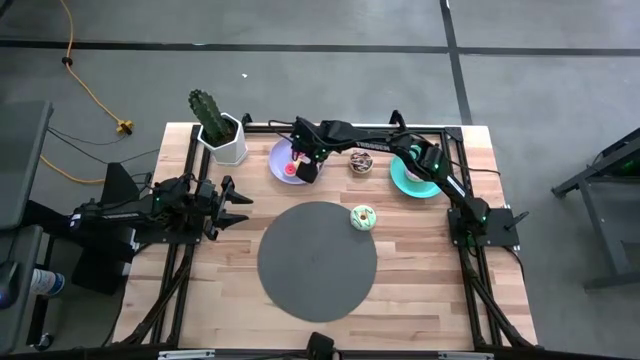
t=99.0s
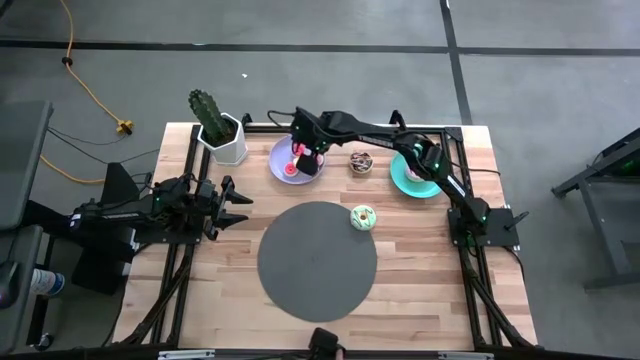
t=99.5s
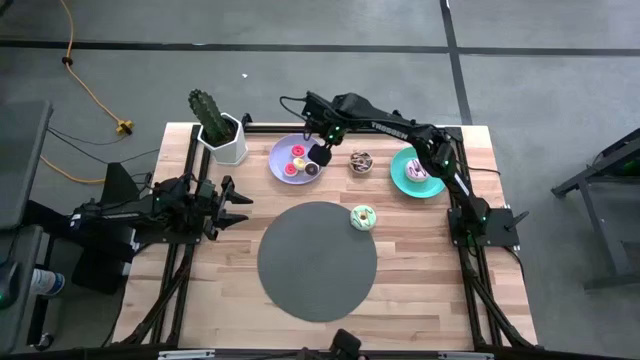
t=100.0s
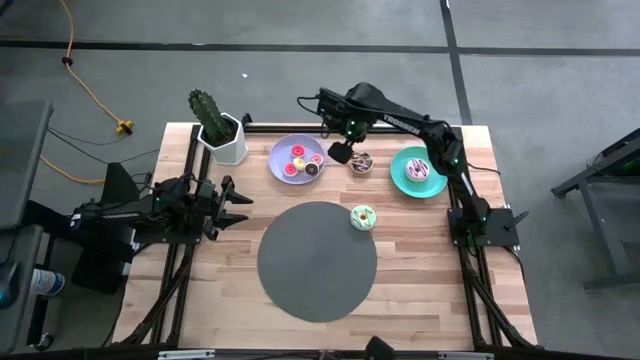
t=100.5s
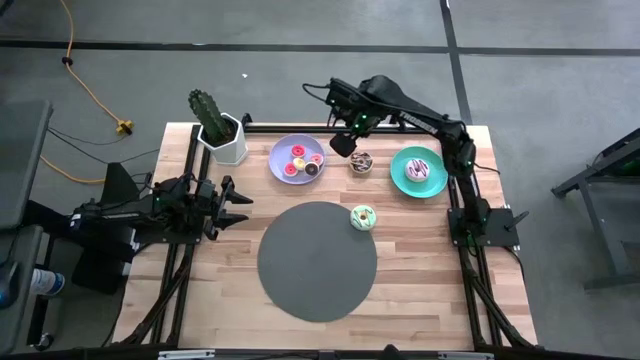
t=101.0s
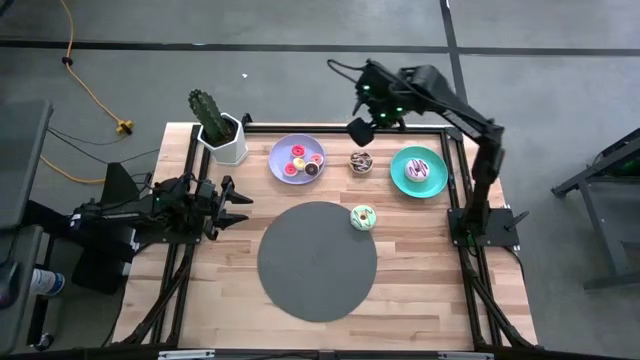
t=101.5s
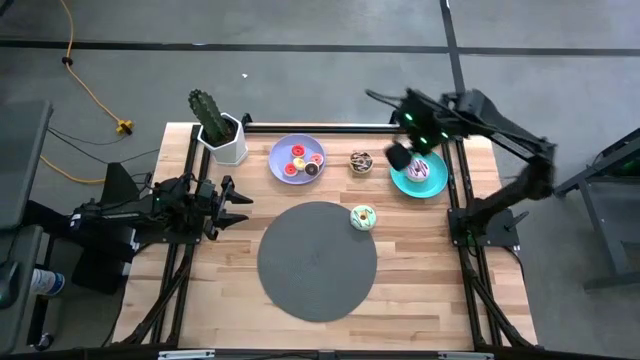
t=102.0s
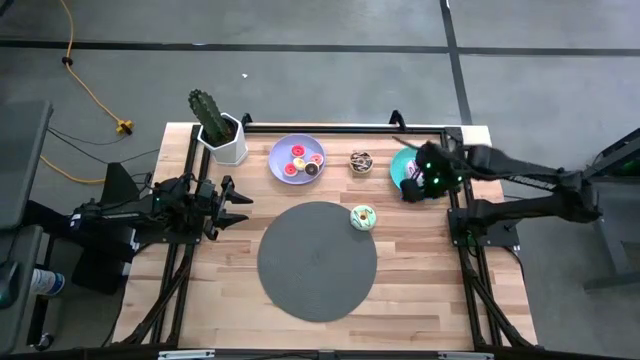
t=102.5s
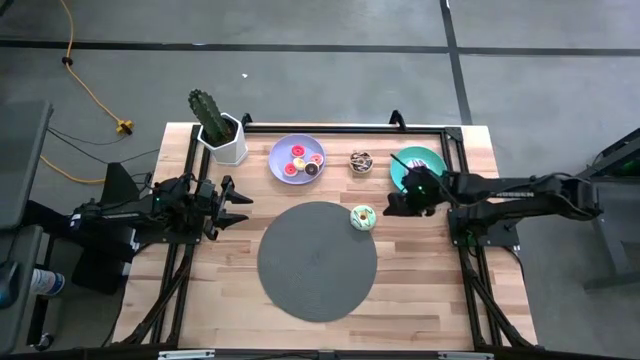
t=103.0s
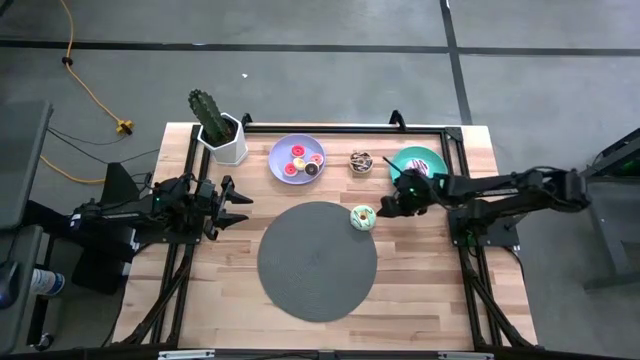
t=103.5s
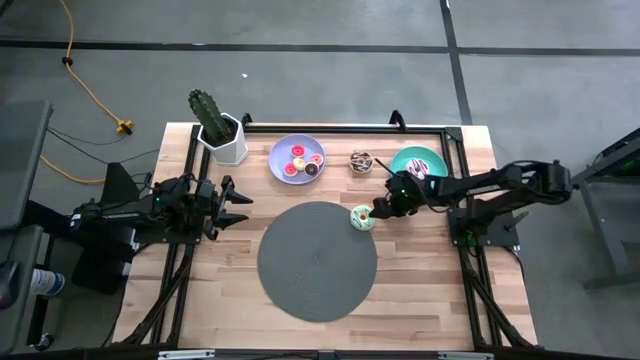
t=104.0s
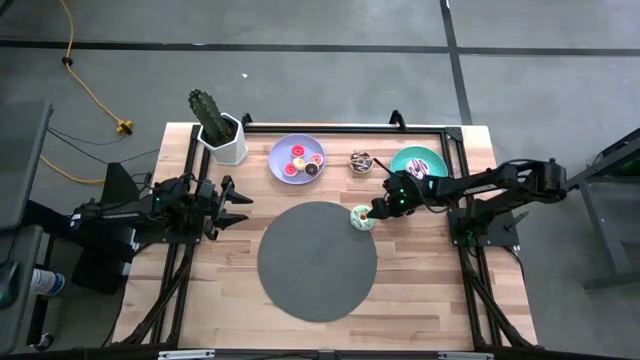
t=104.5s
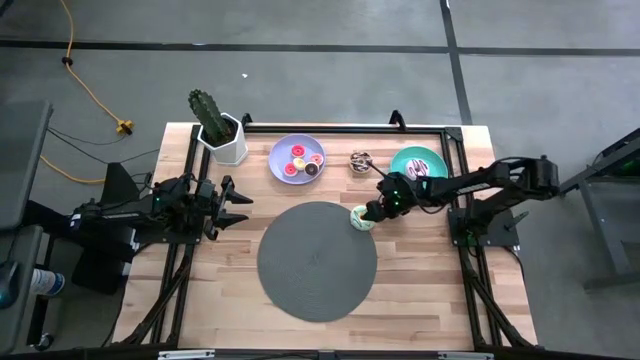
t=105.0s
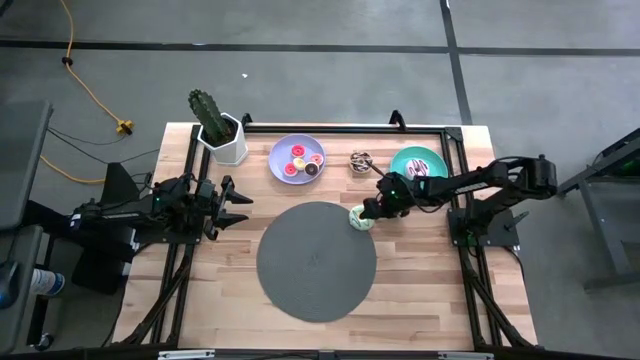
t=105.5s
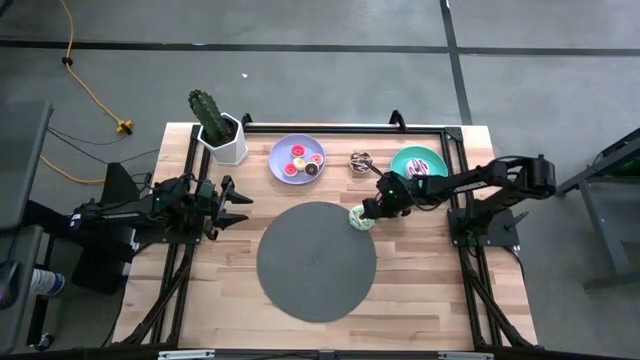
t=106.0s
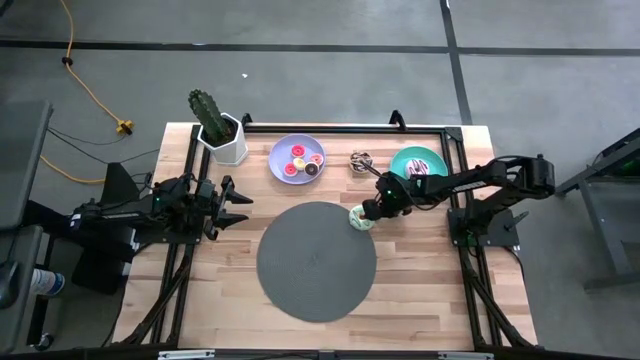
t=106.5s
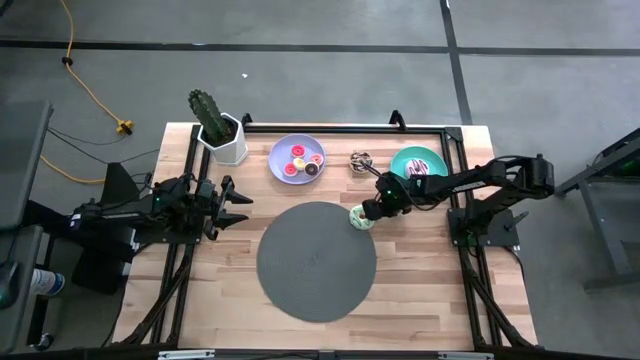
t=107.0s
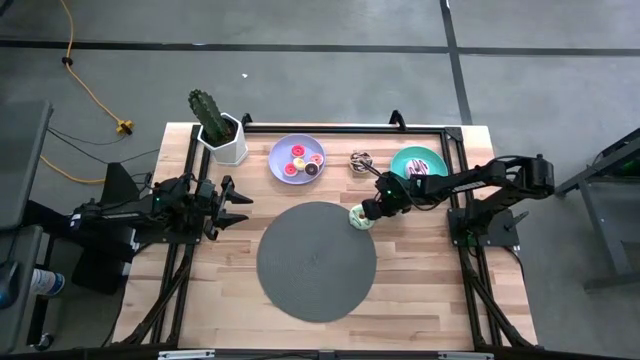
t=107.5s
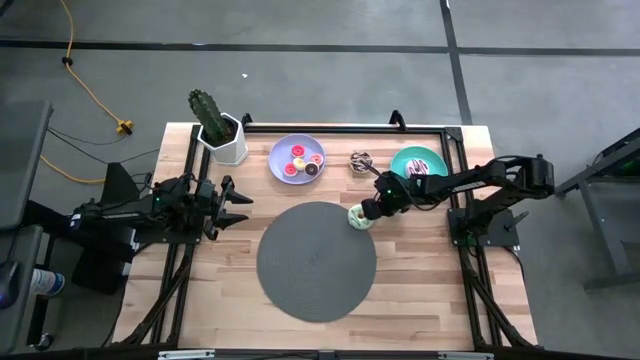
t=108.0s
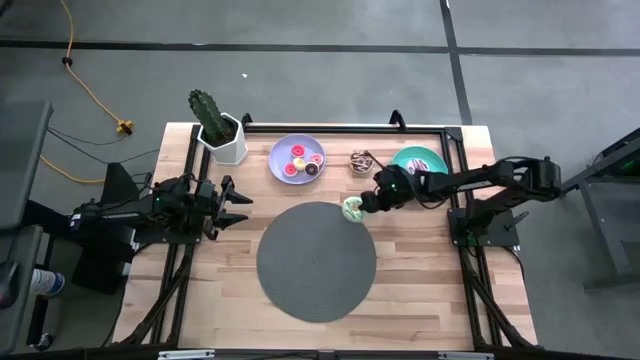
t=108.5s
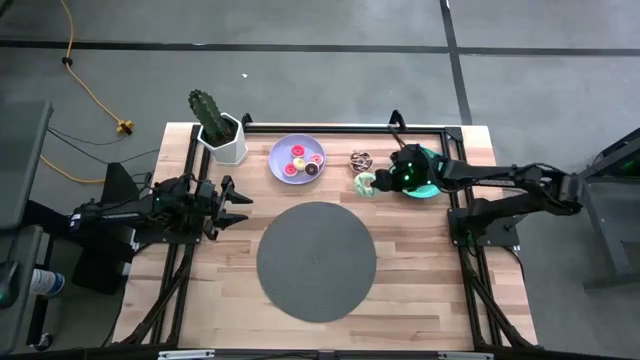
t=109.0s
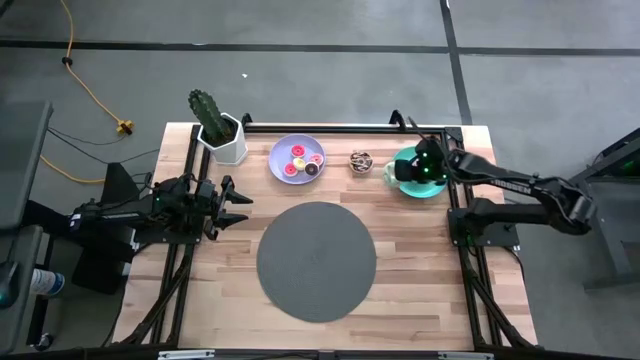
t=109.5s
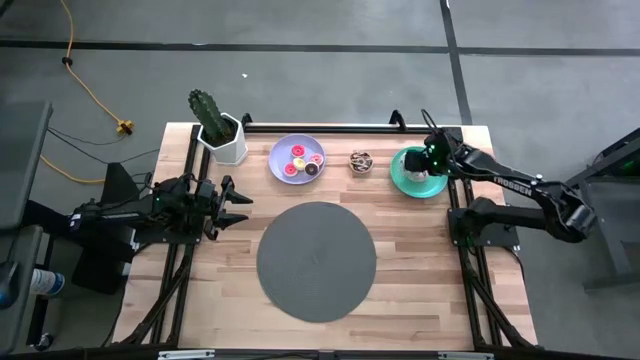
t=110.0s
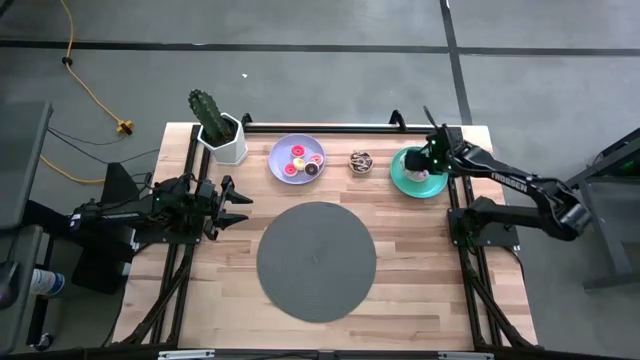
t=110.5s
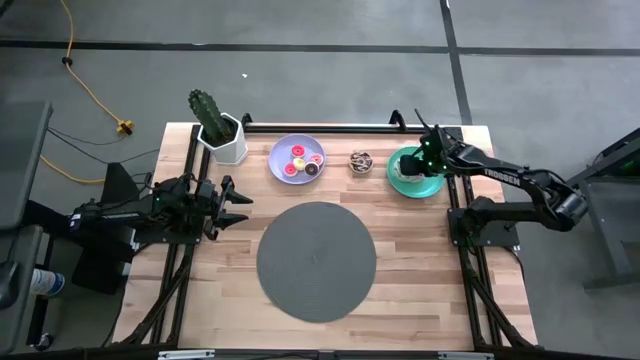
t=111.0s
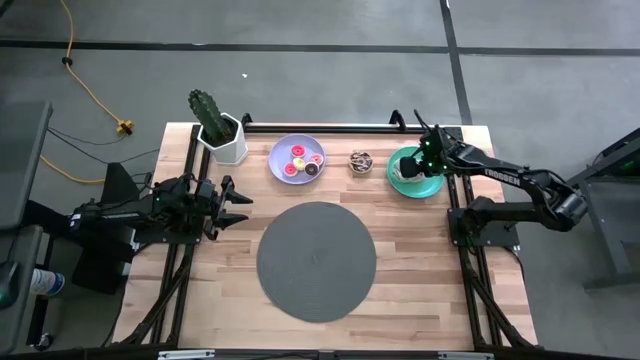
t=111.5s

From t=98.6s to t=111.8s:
Task: Pick & Place donuts
Put the large light blue doughnut on the blue plate

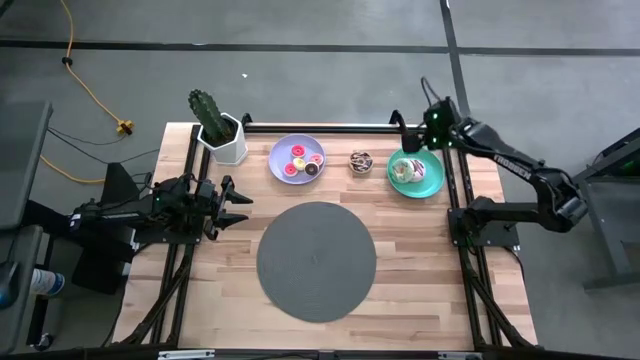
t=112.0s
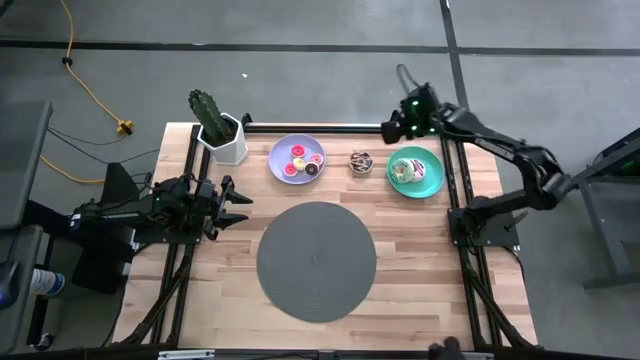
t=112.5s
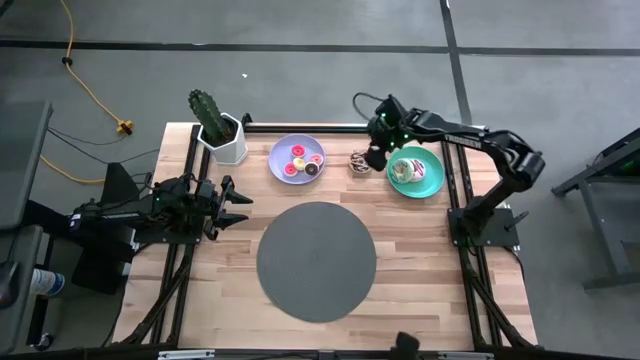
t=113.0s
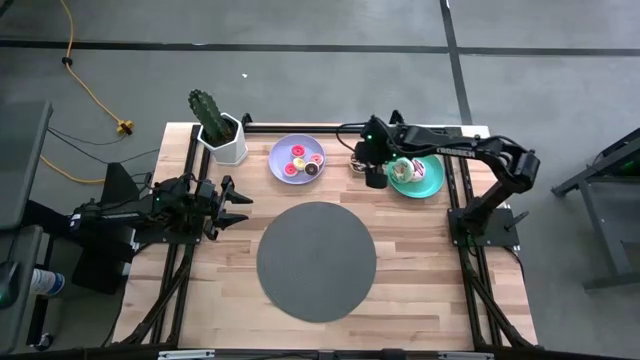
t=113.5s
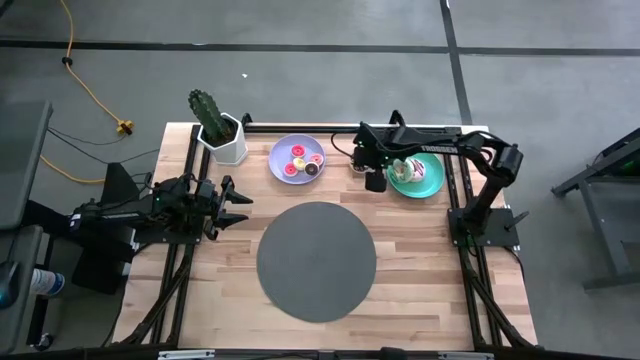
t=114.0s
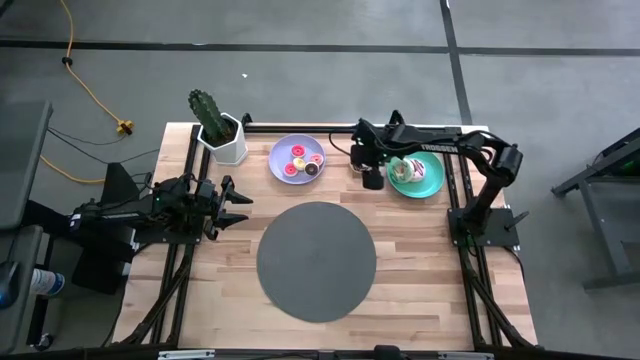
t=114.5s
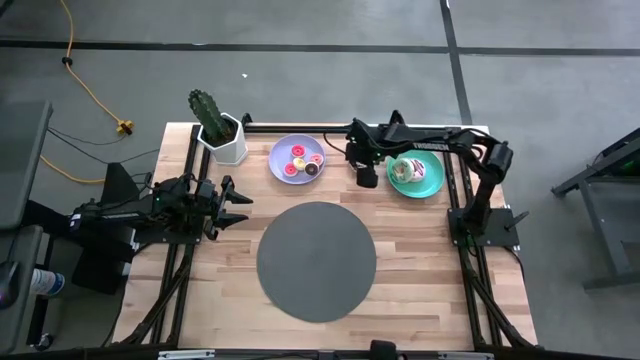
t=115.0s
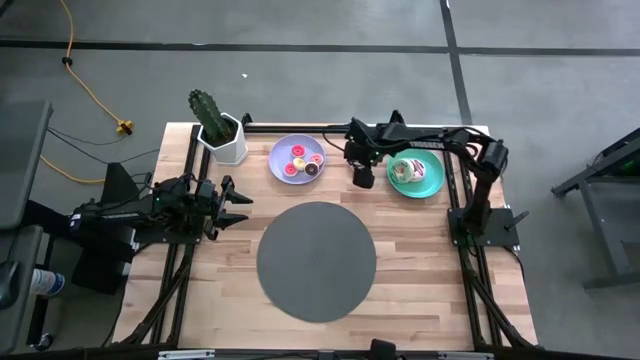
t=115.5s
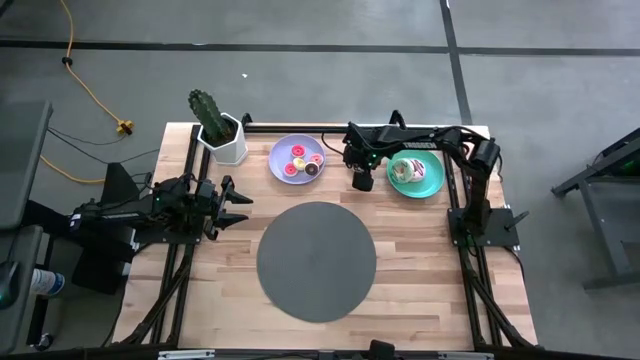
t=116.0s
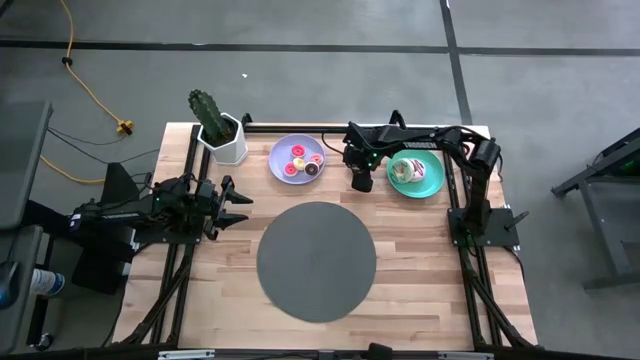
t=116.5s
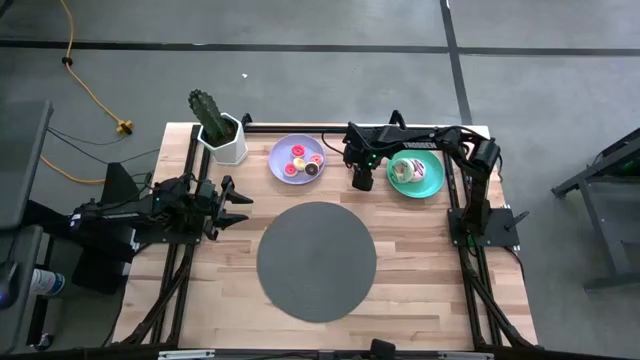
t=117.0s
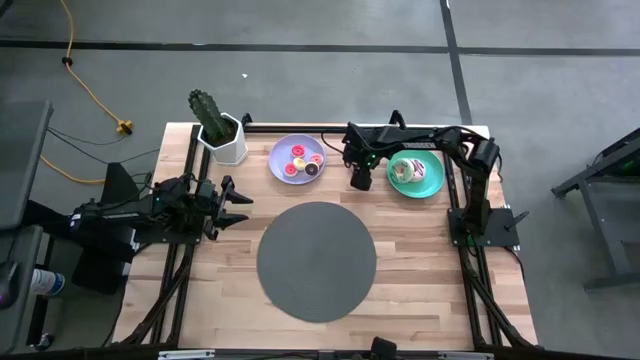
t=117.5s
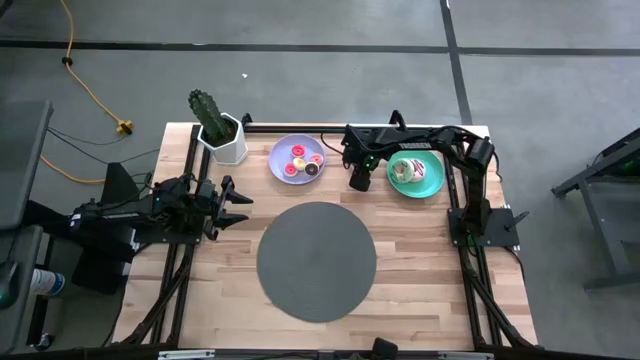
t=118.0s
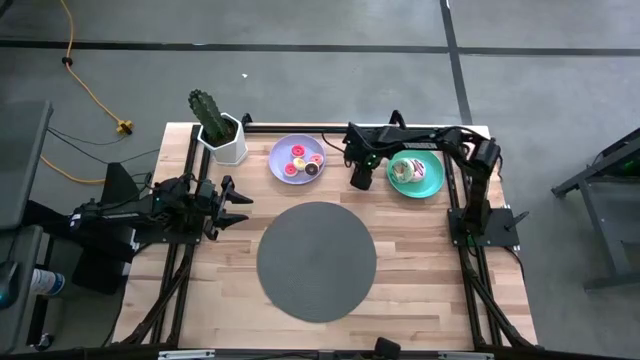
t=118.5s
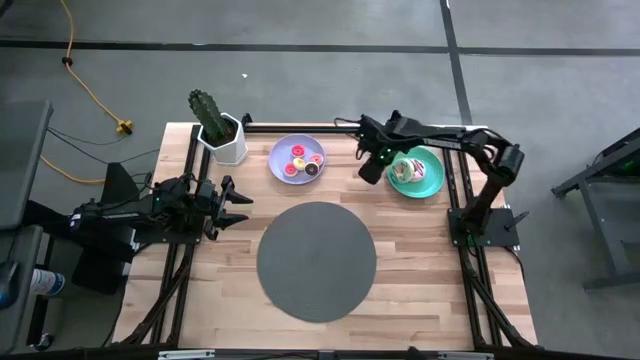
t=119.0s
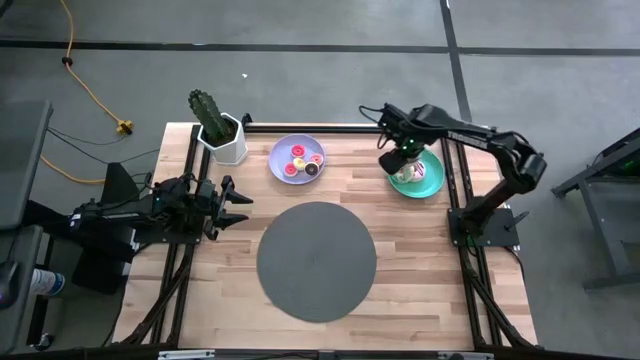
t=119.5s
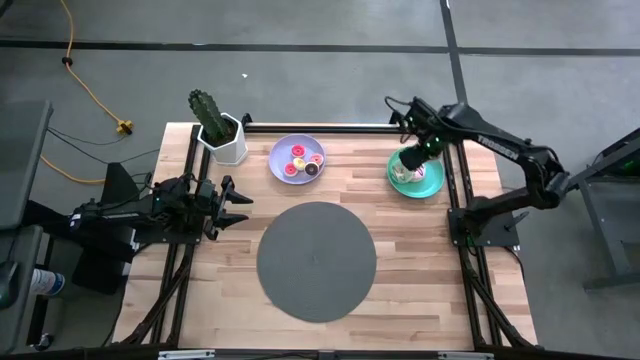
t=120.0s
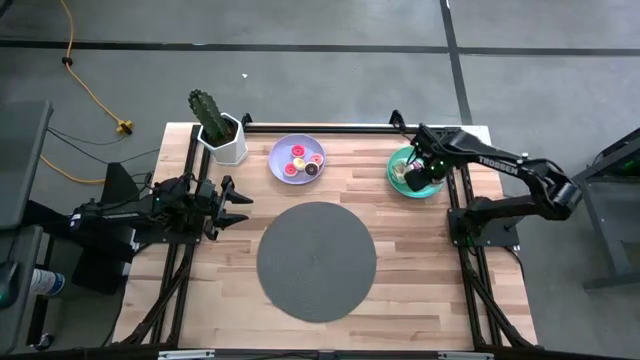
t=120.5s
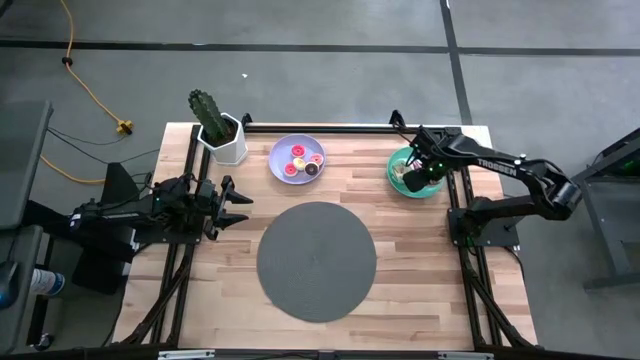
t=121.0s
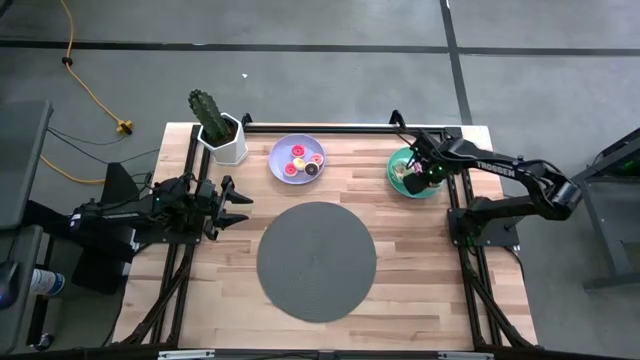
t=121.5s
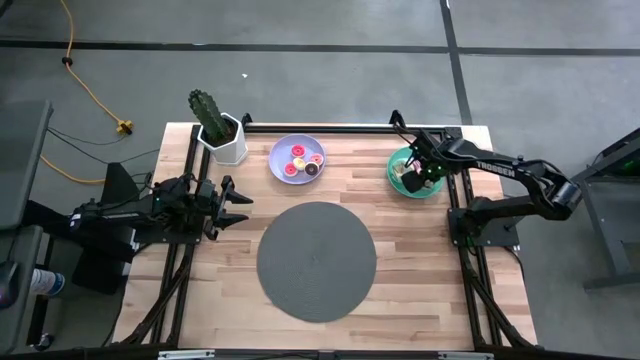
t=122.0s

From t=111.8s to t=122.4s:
Put the large black doughnut on the blue plate
